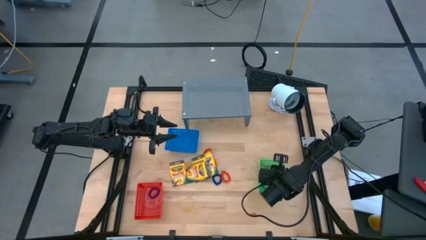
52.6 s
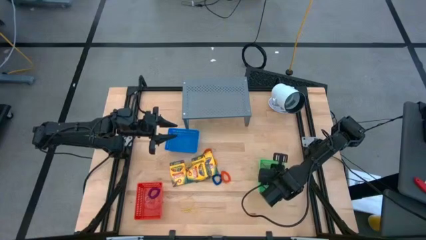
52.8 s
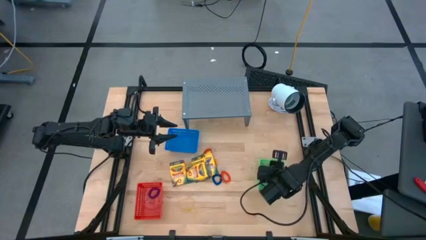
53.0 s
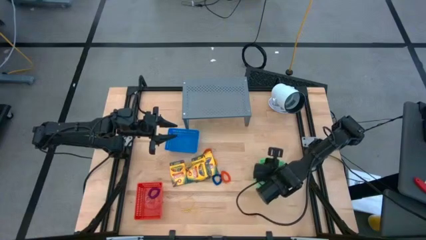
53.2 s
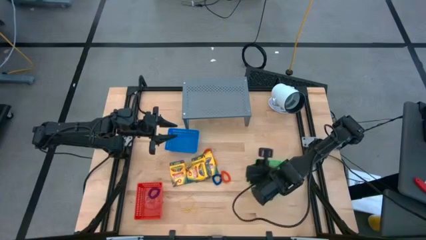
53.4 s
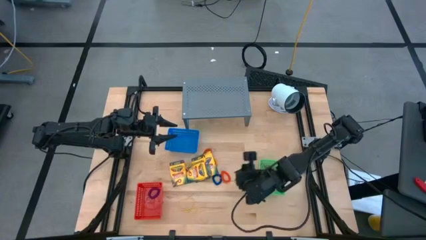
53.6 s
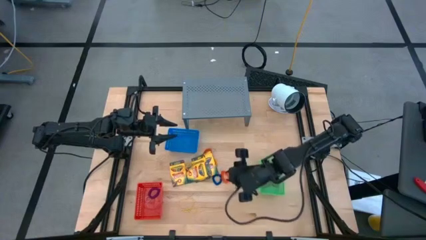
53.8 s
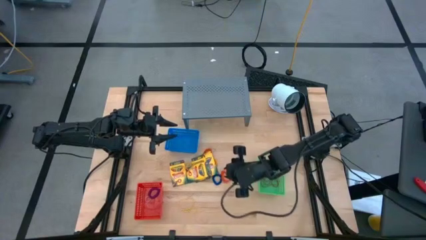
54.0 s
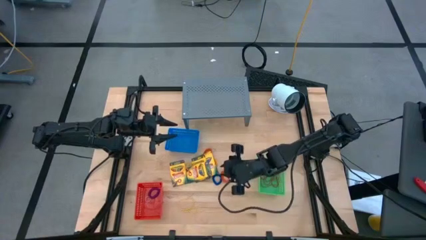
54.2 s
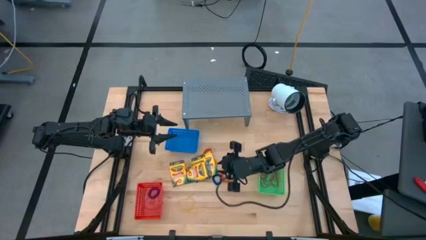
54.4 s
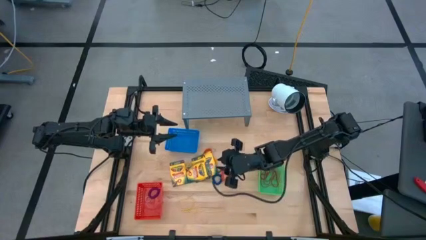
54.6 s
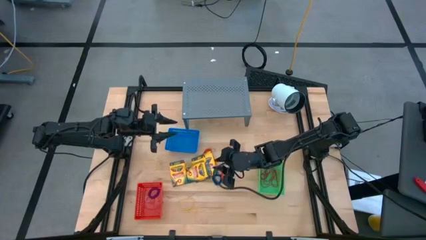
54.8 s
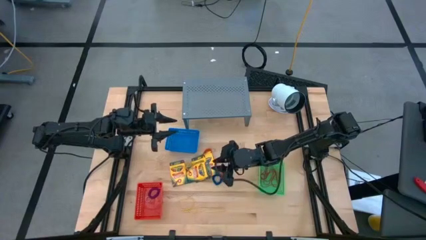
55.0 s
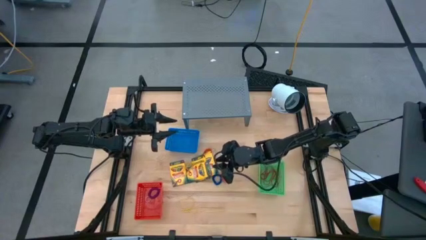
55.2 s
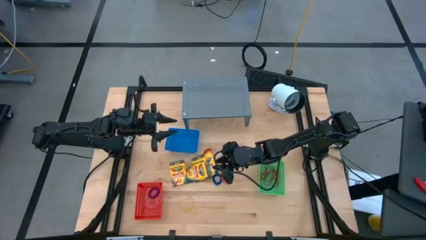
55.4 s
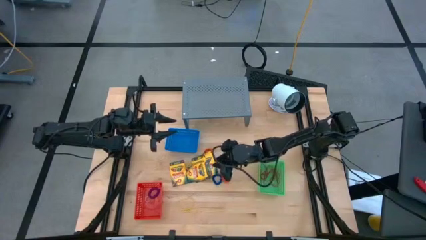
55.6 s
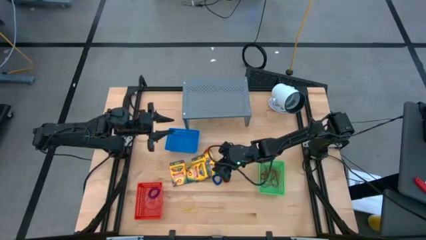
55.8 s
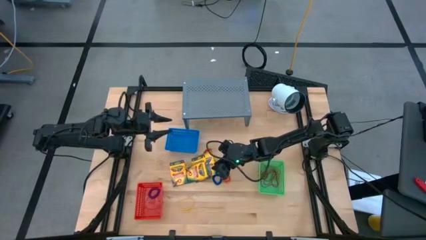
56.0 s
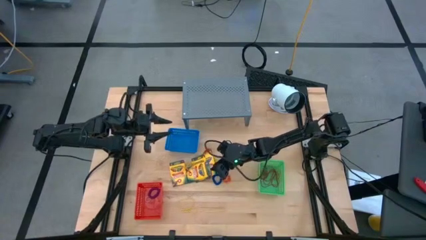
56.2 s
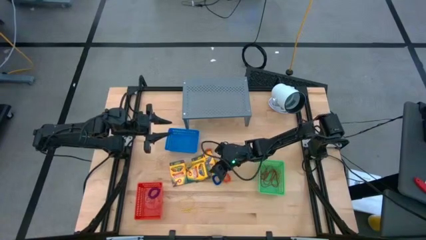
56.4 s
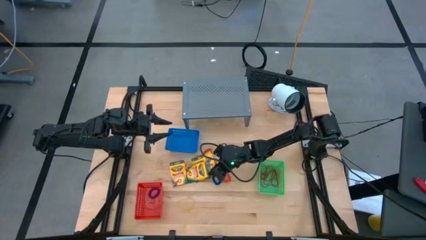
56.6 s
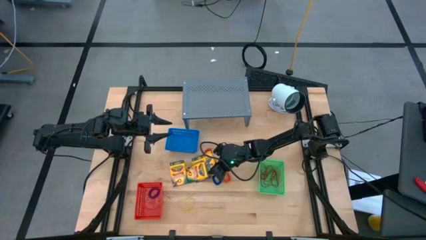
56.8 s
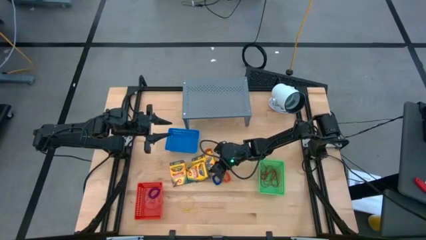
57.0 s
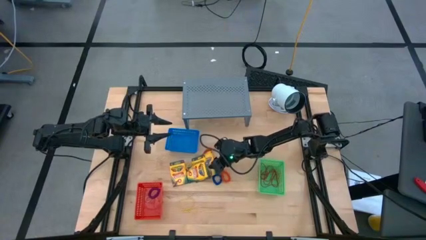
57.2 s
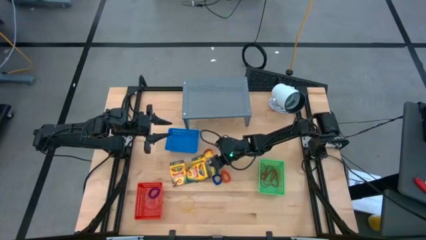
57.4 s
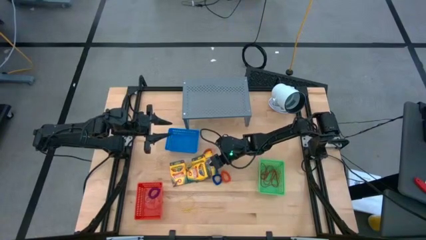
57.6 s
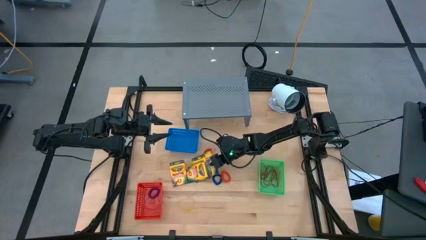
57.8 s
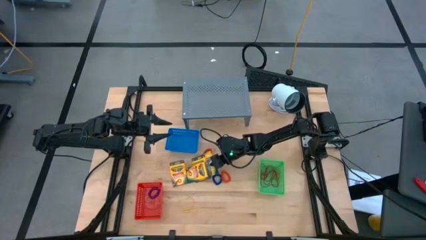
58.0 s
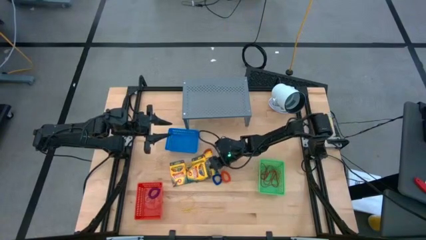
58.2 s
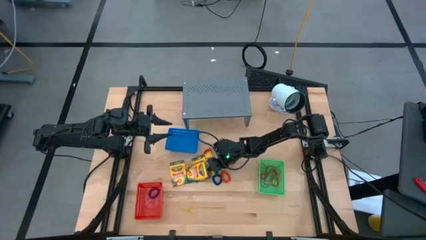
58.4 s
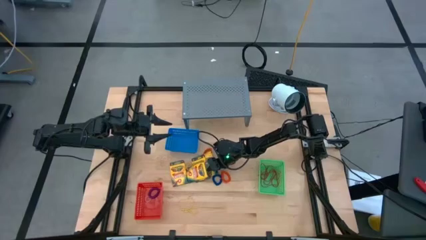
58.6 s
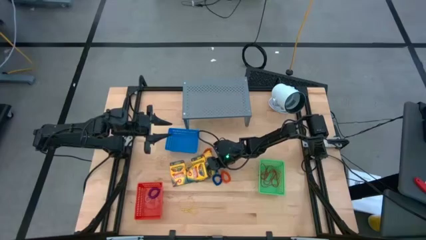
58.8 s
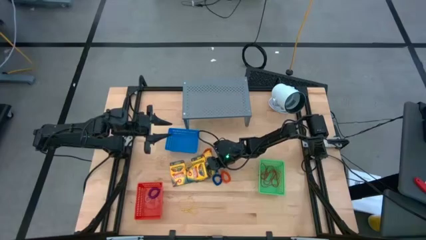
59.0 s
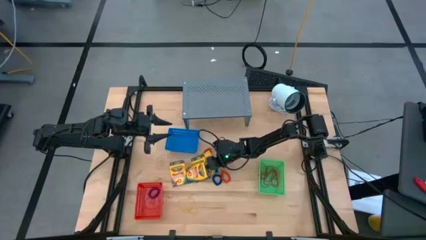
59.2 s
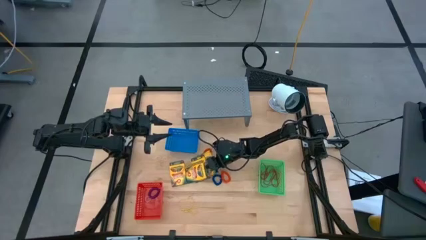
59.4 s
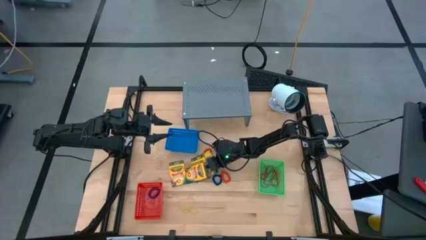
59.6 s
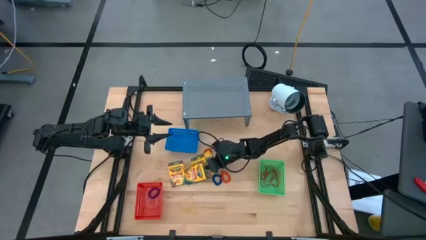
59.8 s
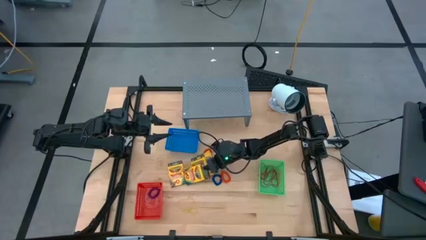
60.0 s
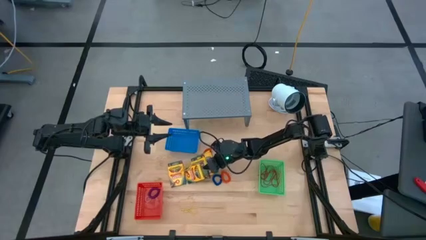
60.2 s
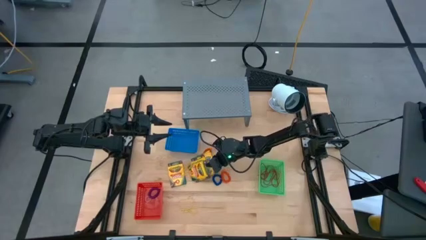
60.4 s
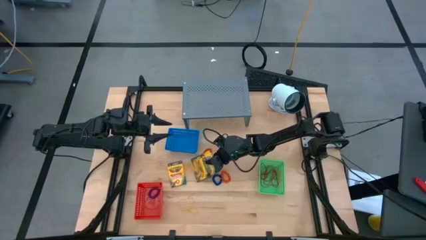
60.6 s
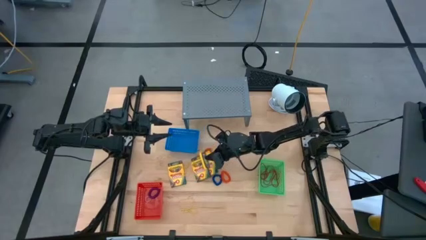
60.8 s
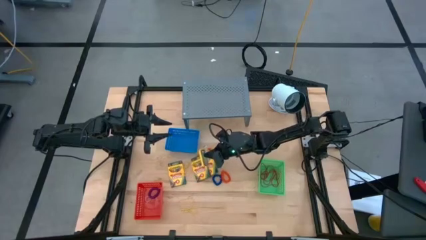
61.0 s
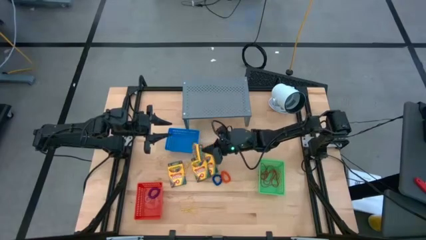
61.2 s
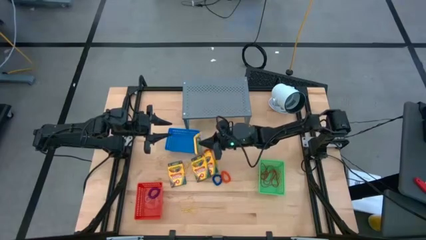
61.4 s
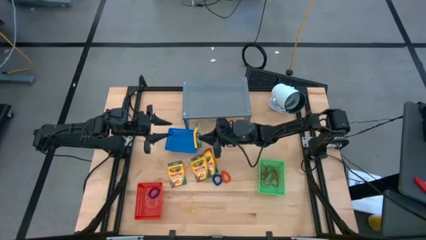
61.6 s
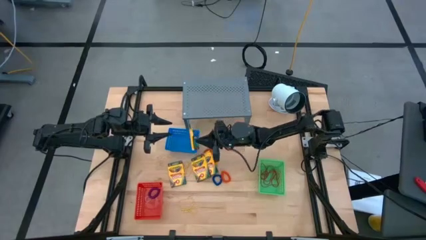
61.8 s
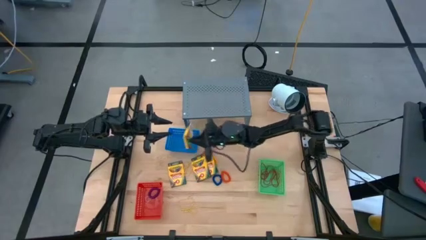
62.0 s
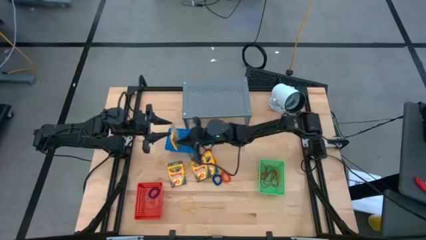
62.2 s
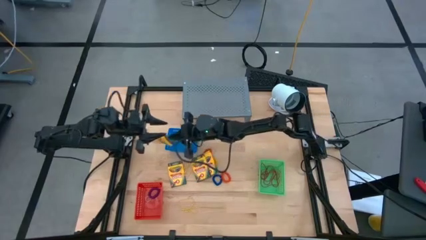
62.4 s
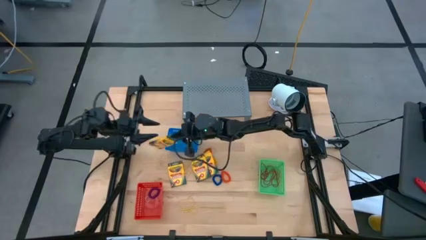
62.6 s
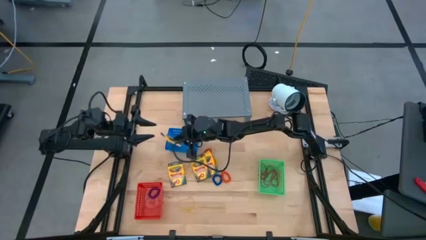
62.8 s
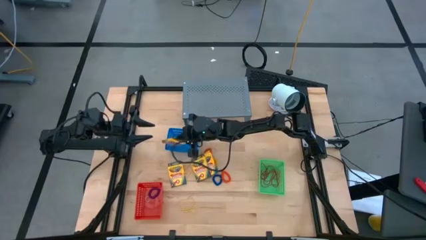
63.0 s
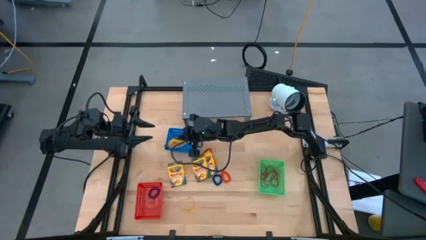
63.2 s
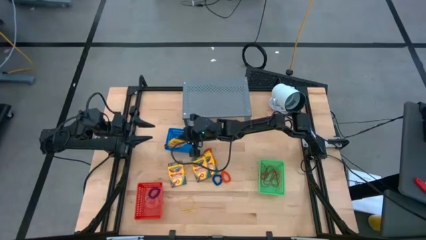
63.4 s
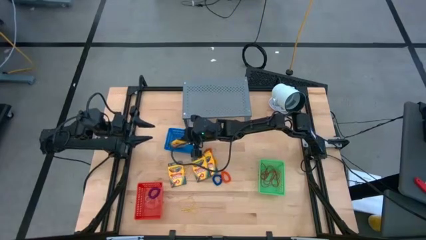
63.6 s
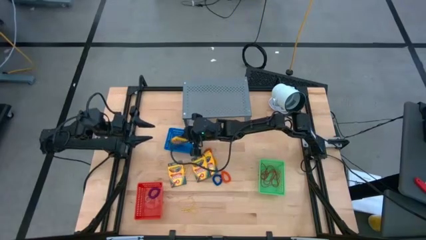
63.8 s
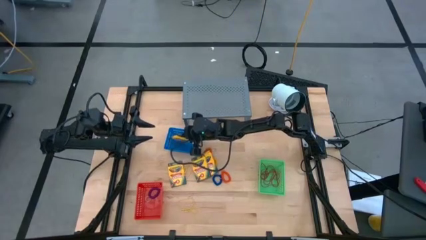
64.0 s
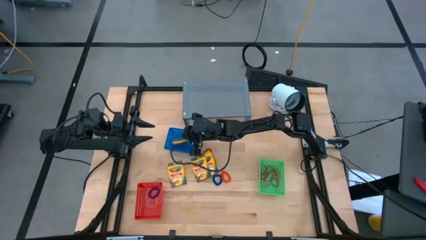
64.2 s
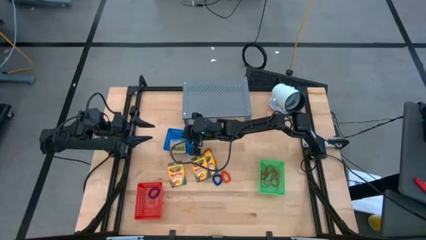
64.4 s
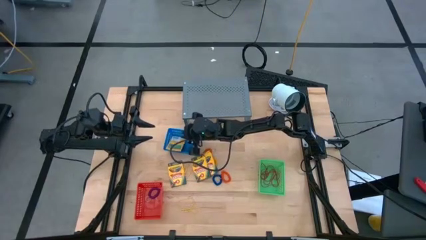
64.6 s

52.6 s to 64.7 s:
Task: Pick & Place Office Desk Supplies
Put the yellow crayon box into the blue bin

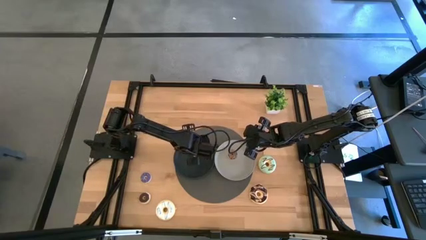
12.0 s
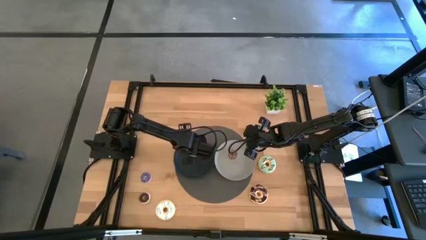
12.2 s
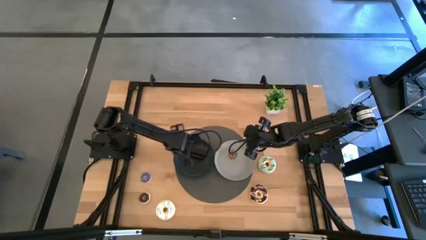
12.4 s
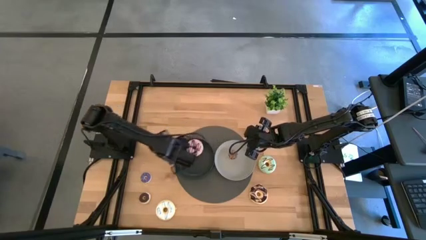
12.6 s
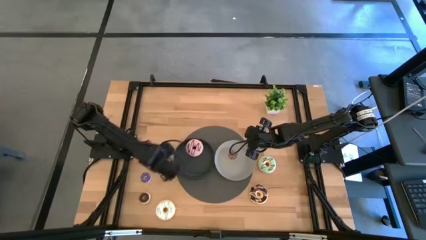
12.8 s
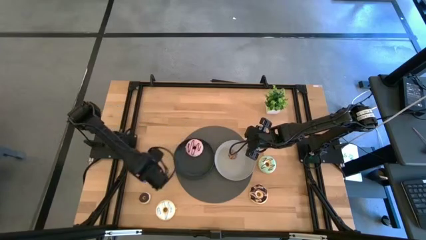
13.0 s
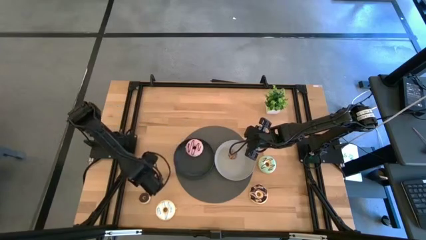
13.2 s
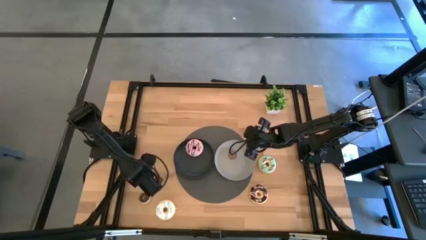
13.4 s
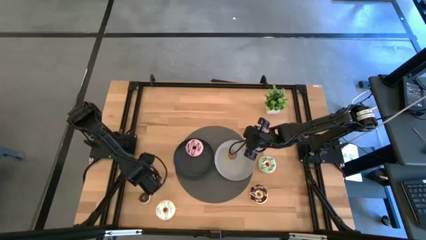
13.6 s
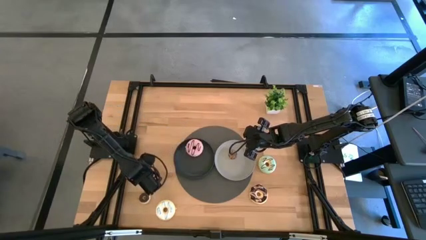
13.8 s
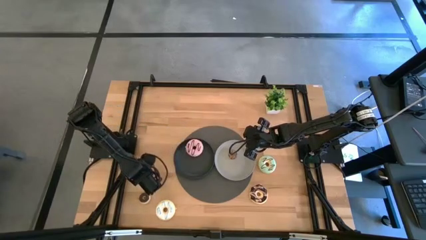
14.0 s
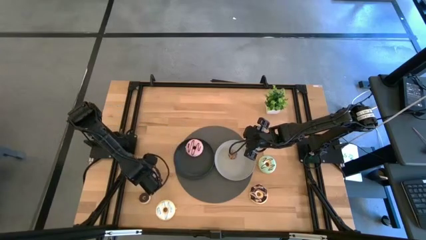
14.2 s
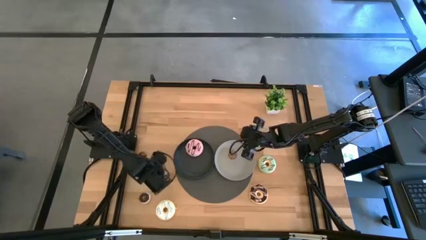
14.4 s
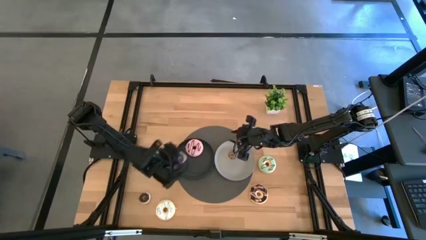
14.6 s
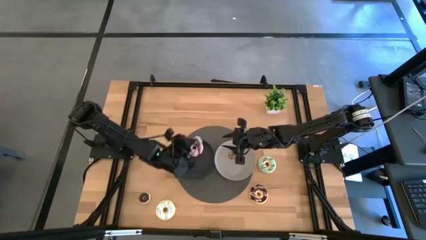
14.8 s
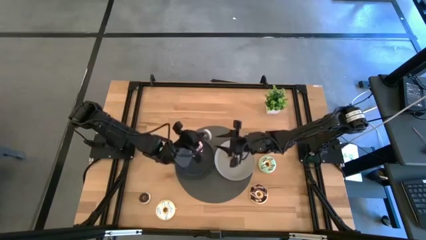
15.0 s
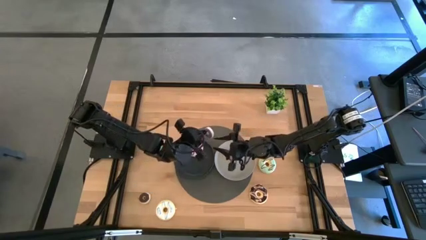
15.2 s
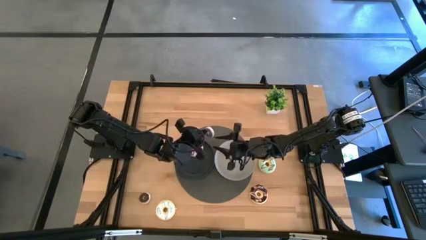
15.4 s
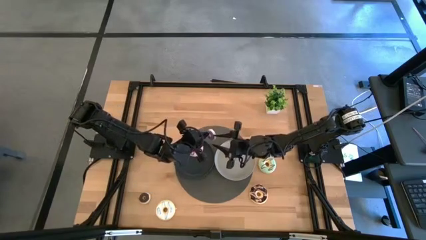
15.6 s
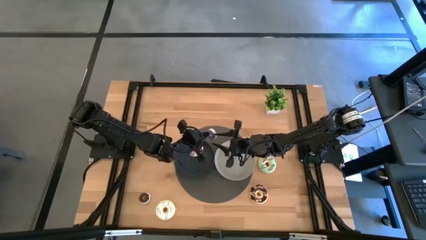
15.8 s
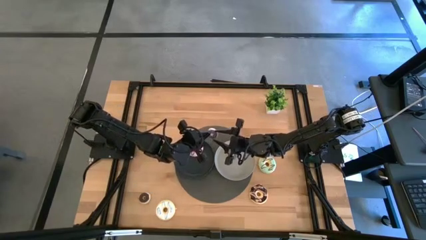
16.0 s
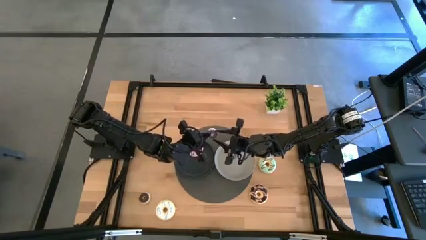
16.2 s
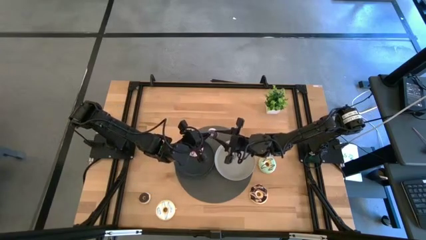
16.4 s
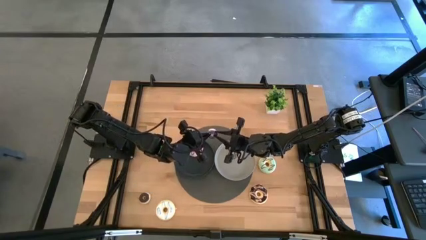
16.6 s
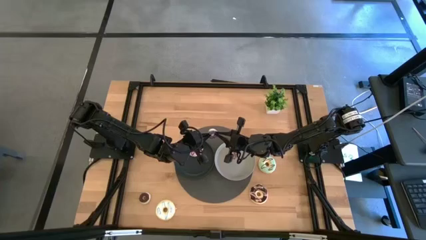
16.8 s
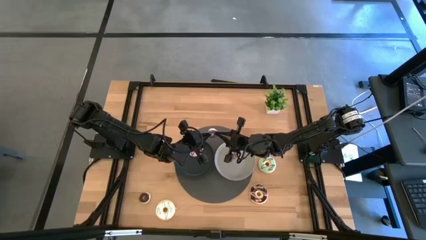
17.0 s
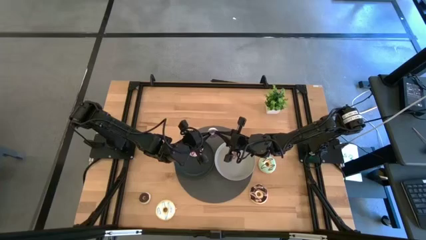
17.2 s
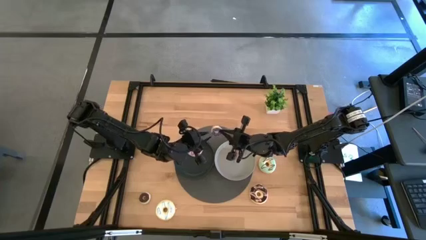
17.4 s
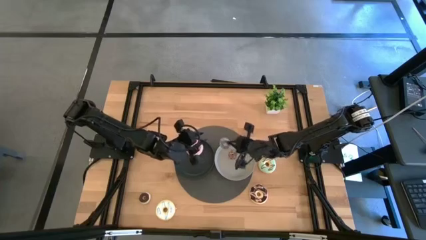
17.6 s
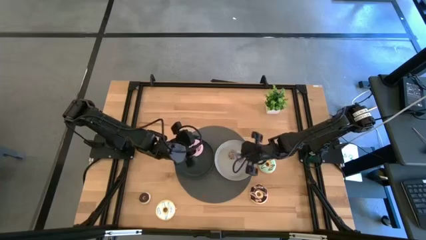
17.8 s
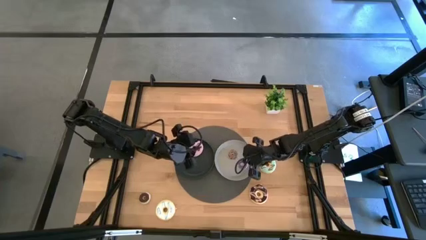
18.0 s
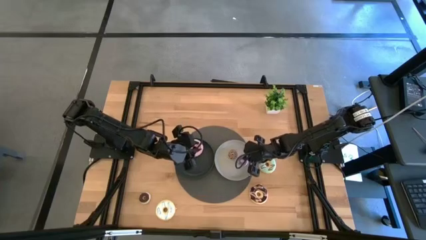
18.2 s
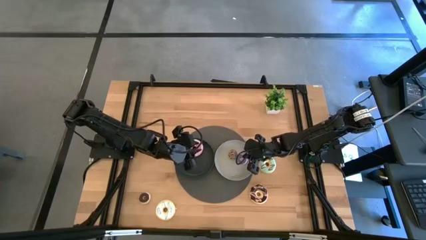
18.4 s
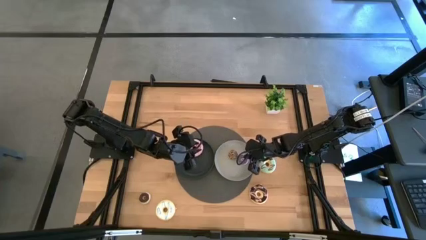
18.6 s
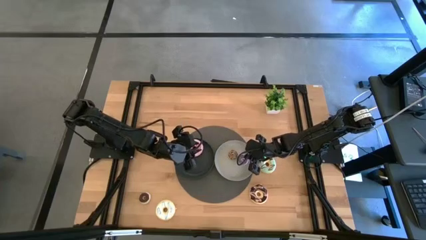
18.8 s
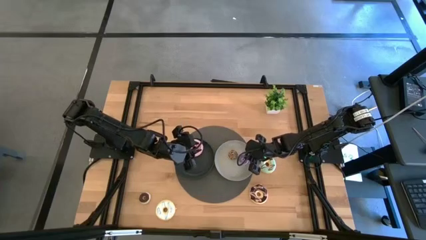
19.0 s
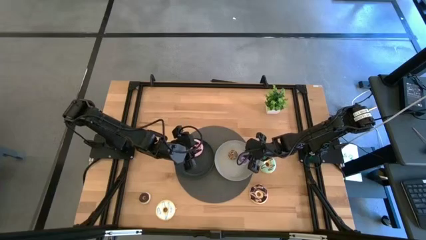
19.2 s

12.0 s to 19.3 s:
Task: Pick & Place donuts
Put the small blue donut on the gray plate
